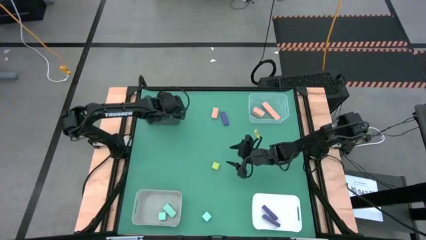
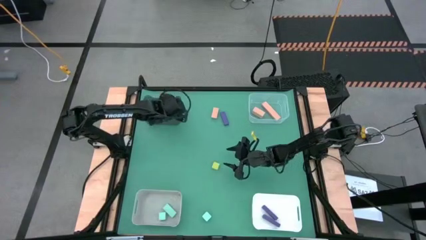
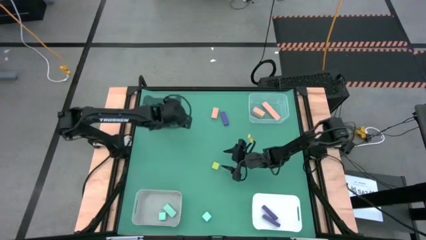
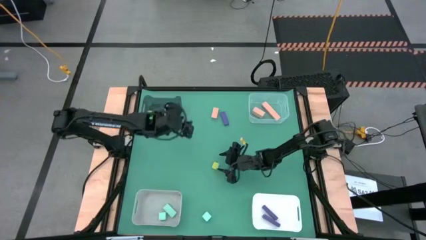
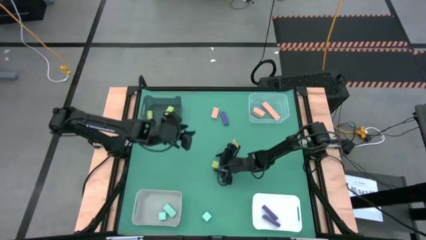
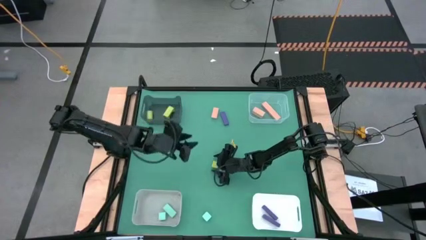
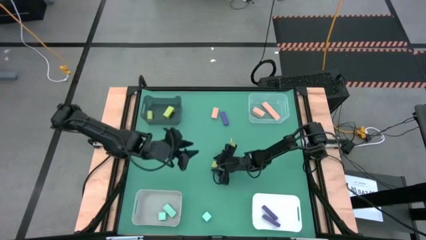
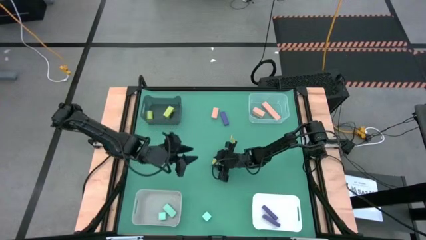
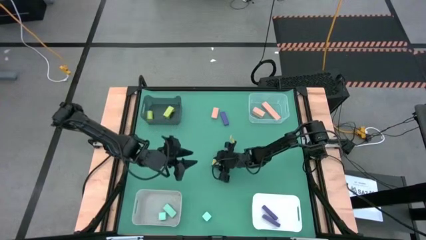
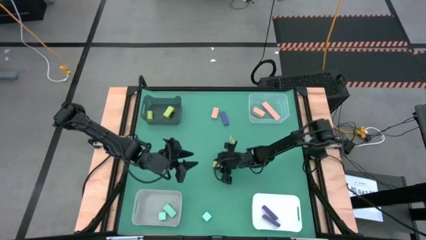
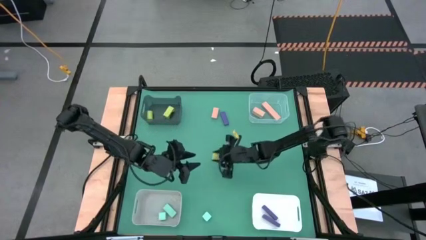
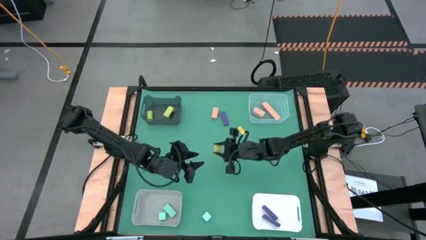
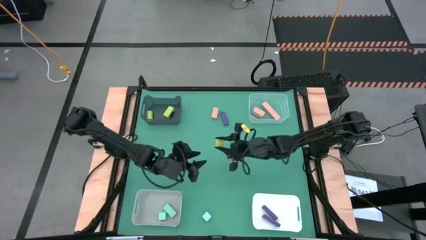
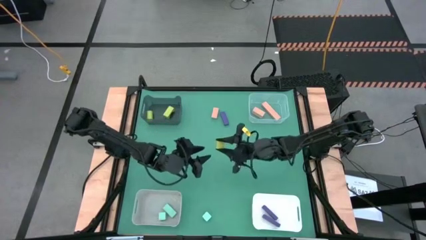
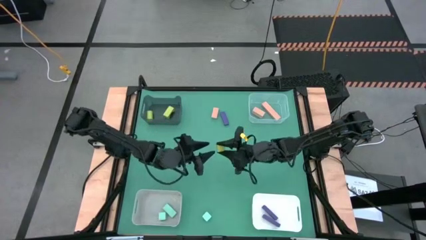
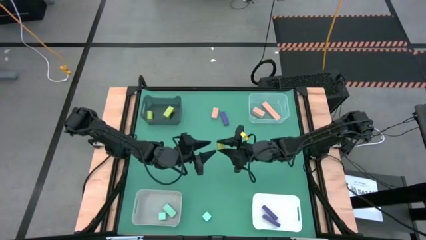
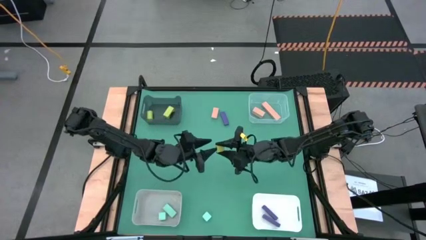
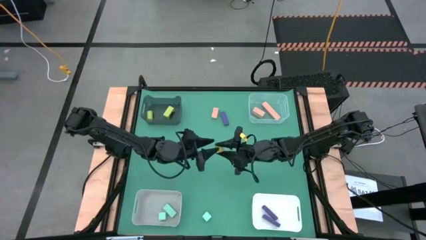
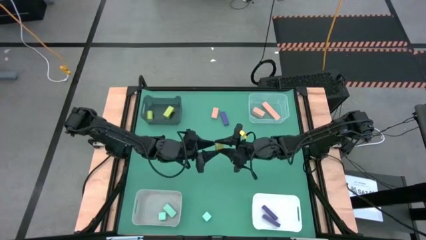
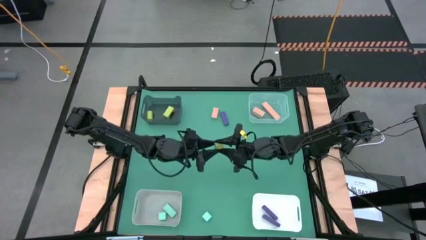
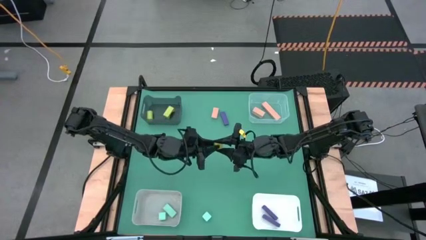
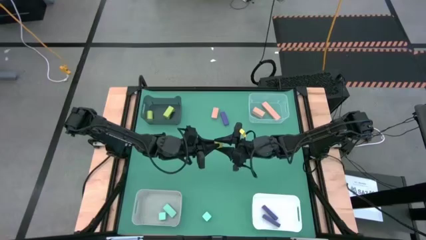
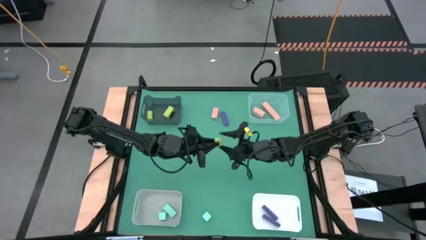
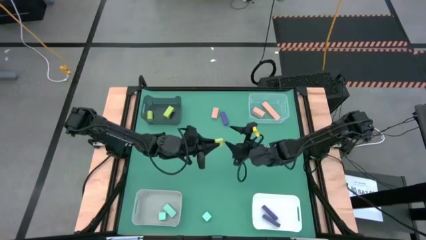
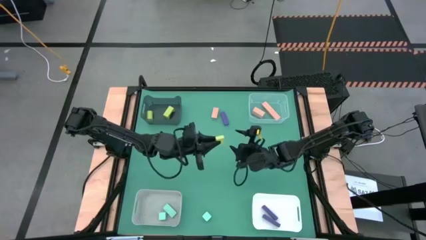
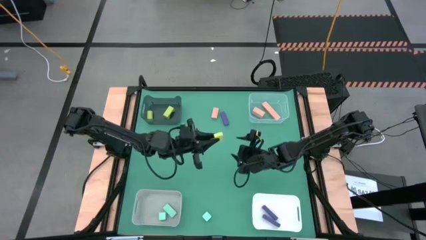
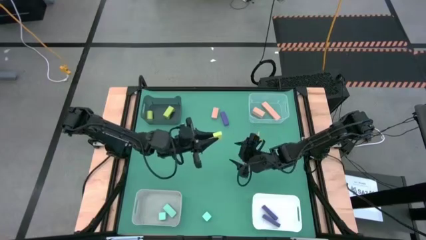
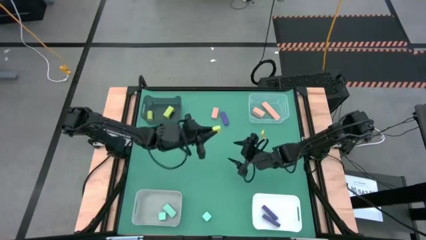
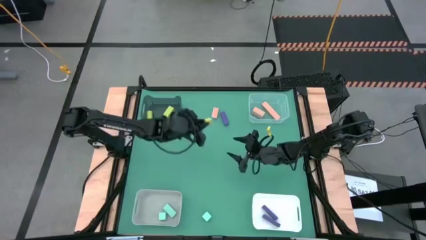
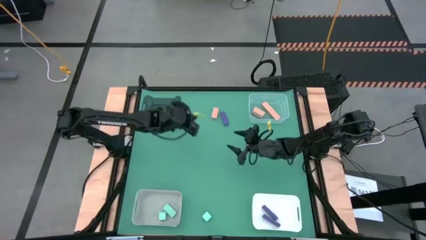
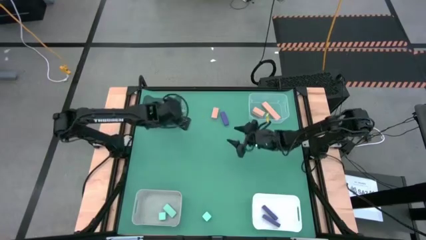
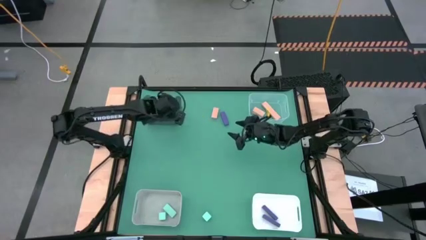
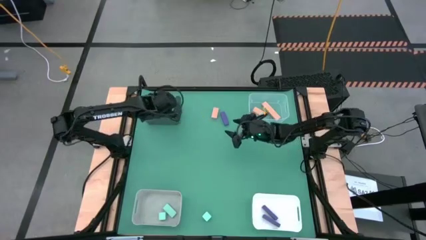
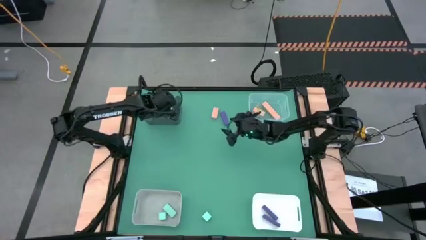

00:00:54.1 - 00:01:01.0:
Task: Sort & place blocks by color
Put the light green block into the black bin

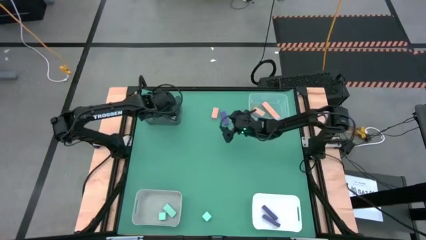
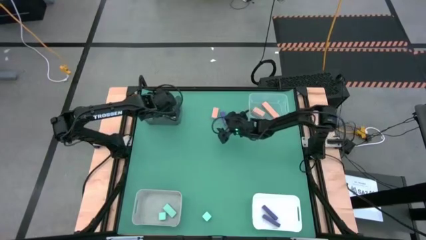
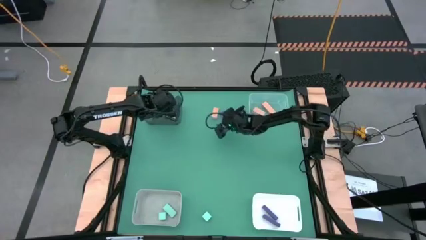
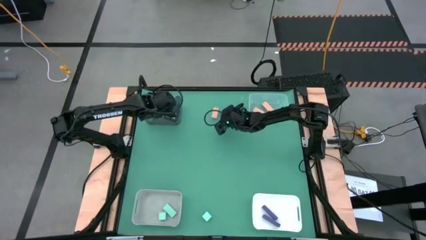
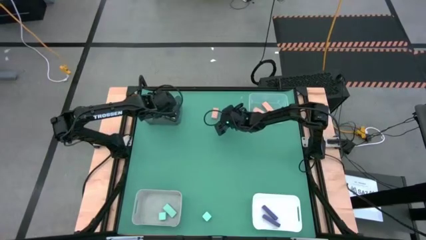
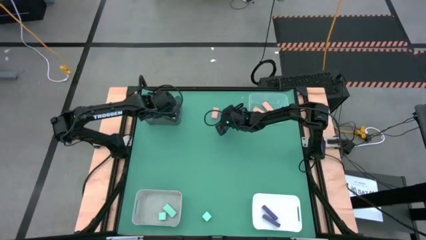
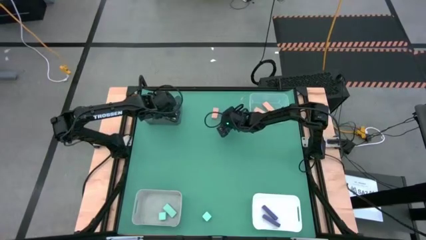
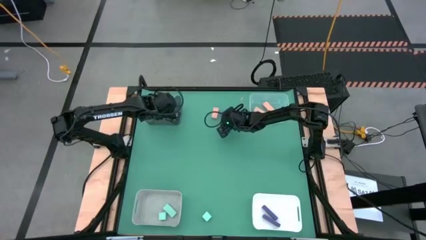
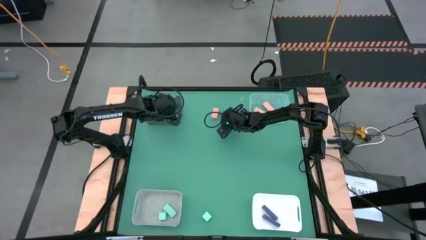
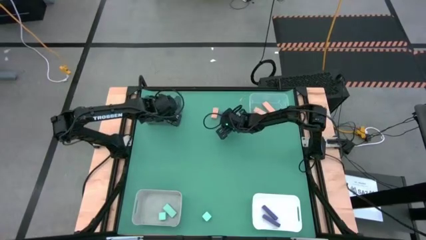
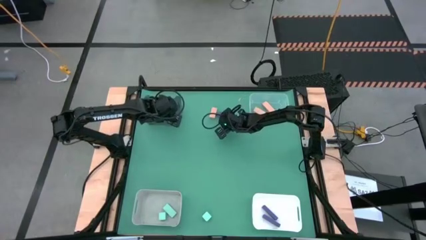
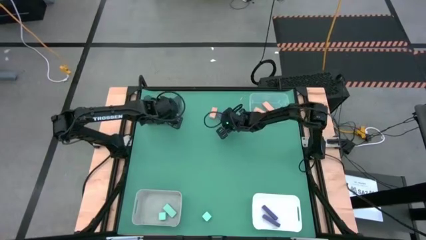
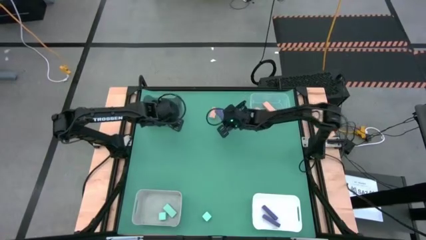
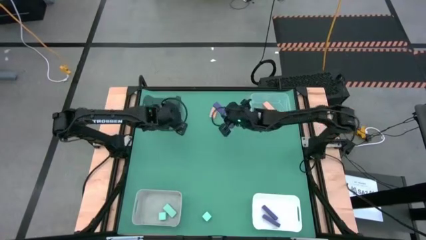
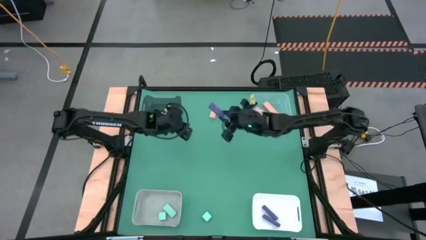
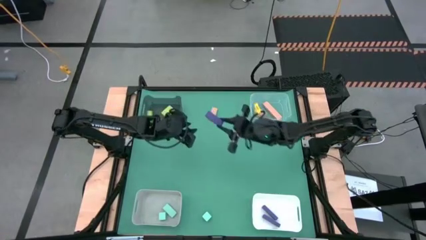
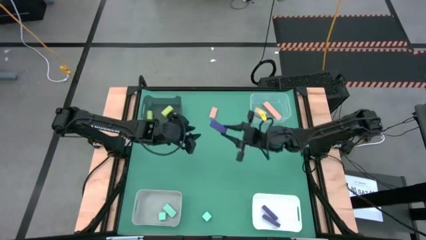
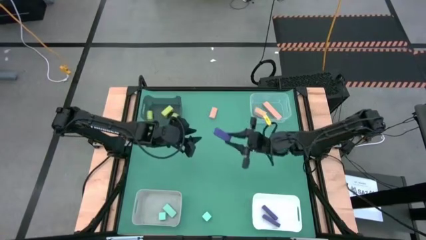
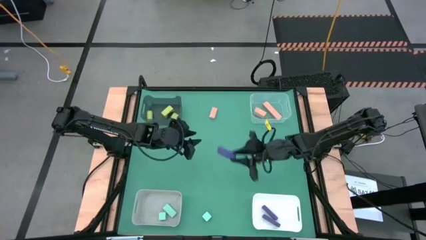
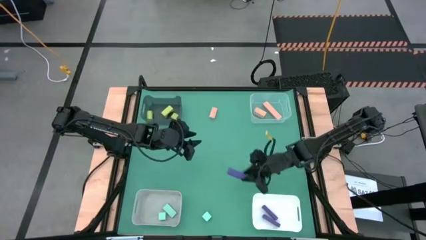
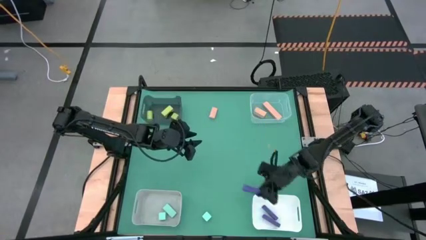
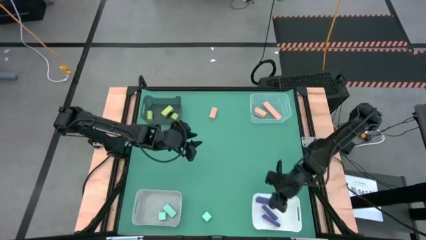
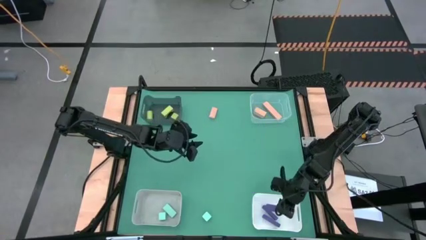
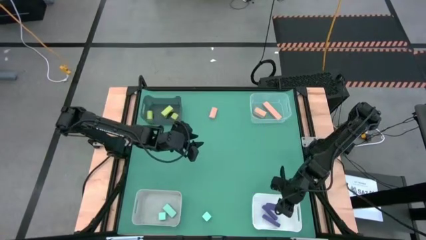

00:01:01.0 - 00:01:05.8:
Put the violet block into the white bin

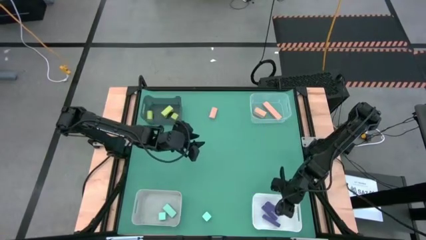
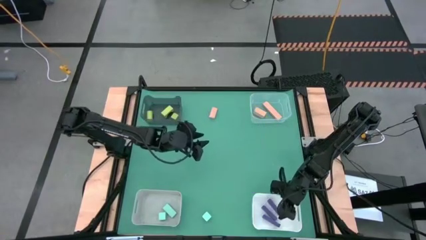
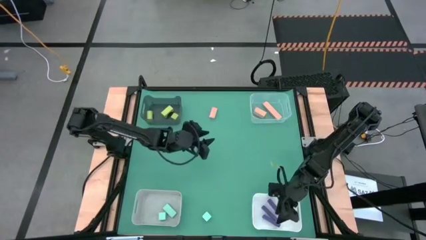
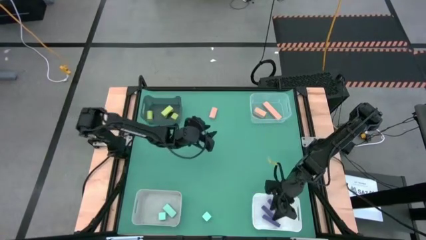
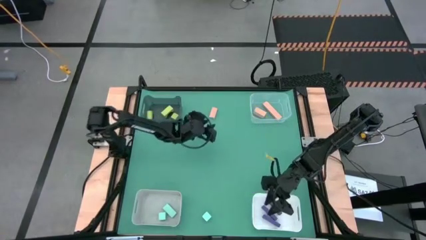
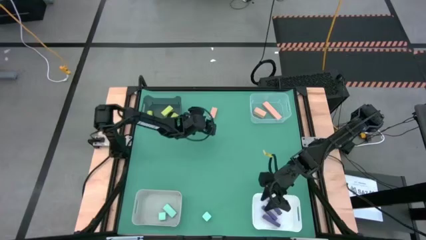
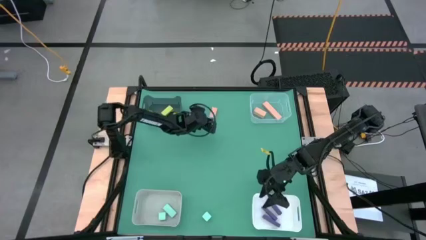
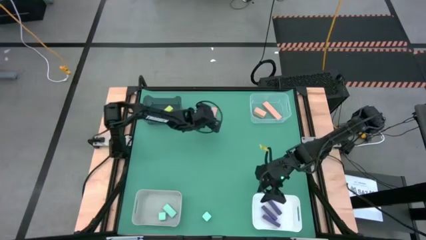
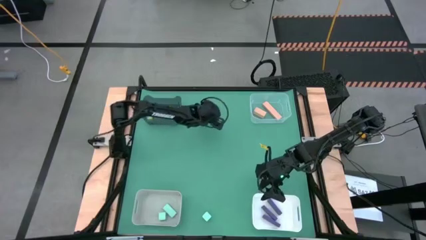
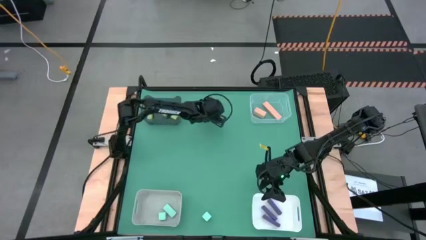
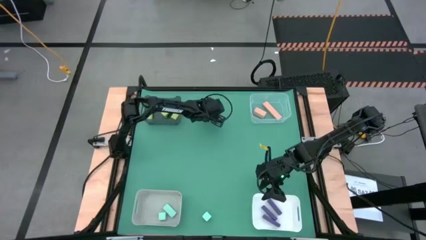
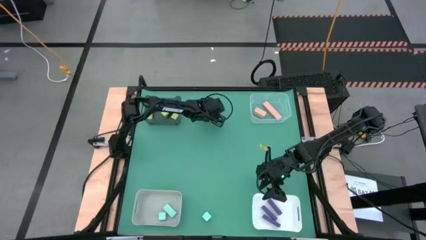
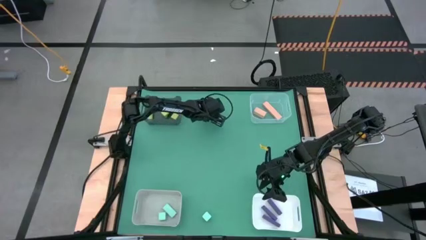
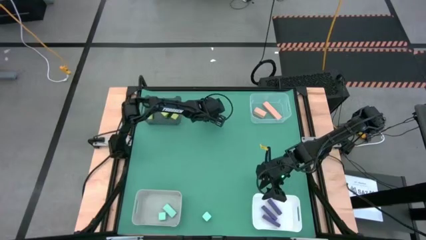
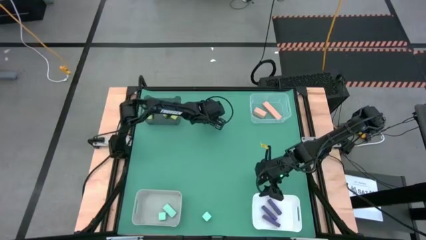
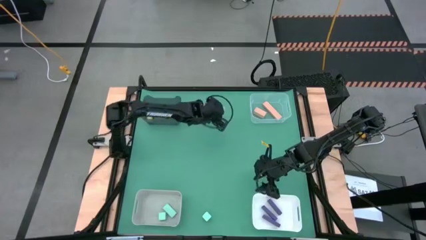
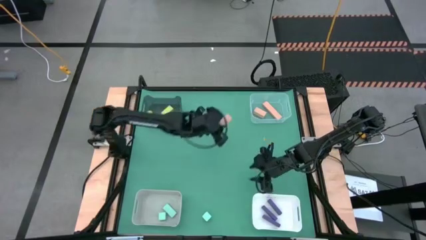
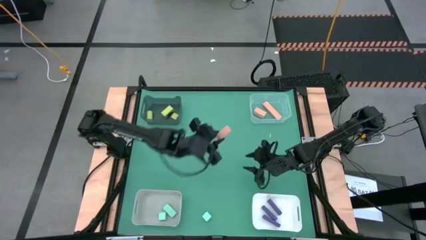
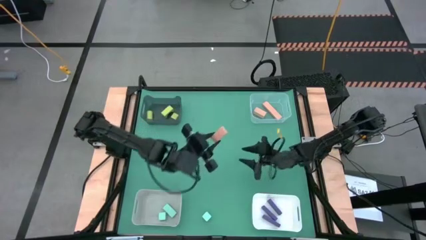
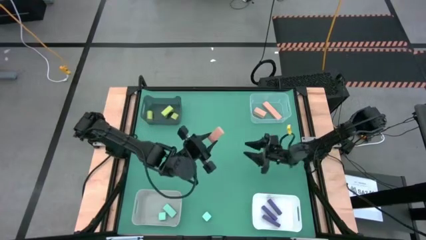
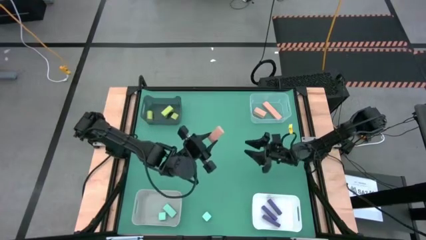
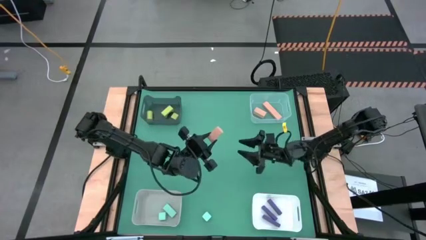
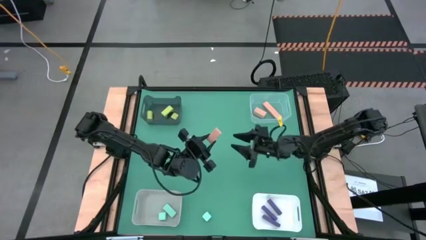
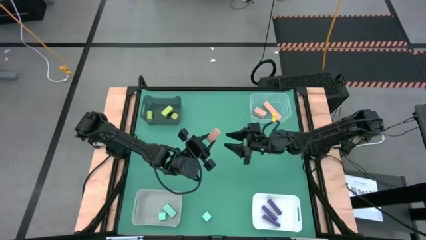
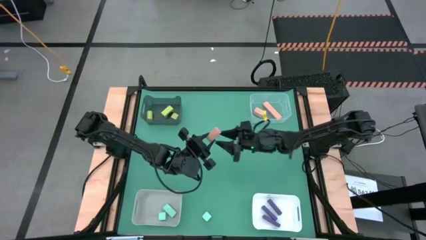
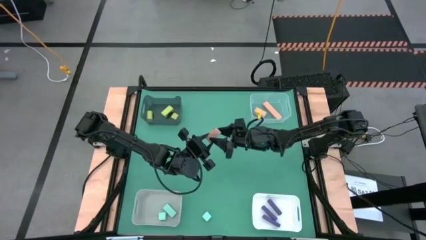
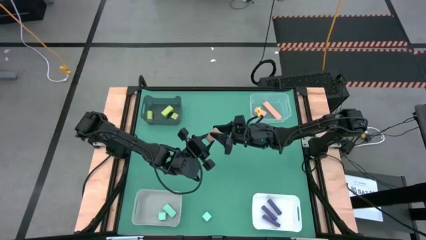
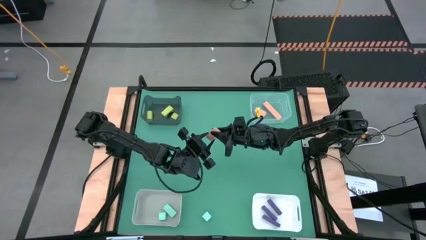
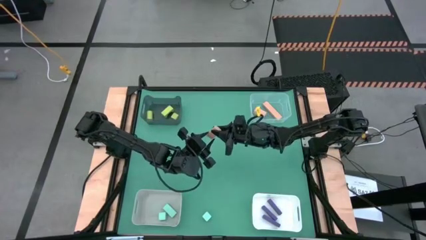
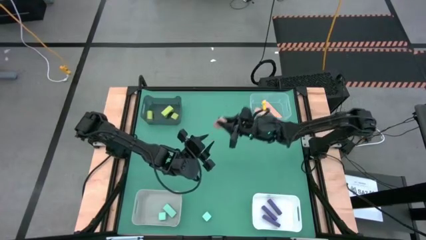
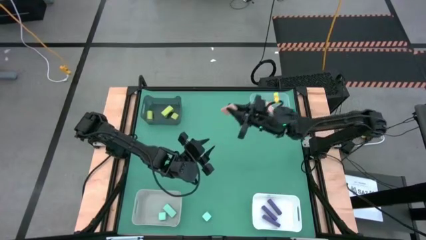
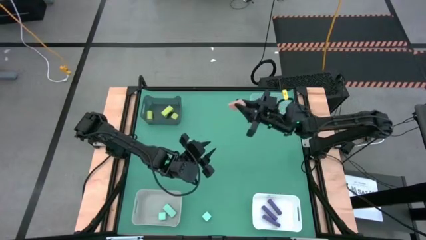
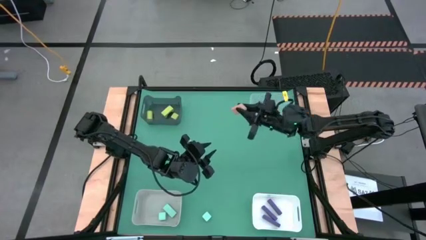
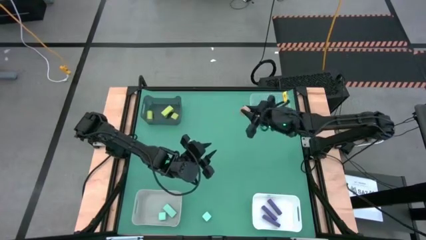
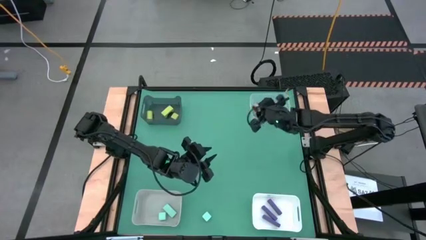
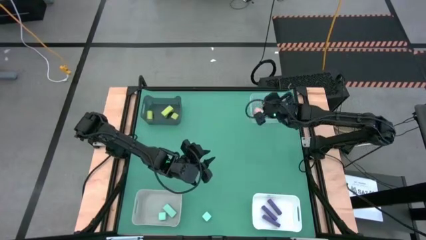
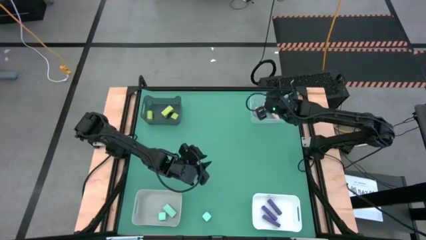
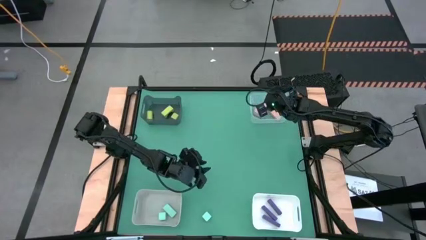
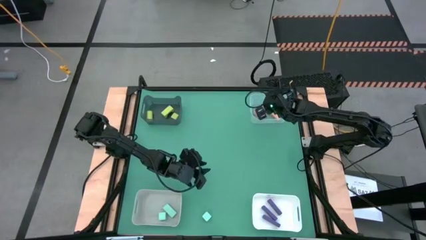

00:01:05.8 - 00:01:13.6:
Put the peach orange block into the transparent bin
